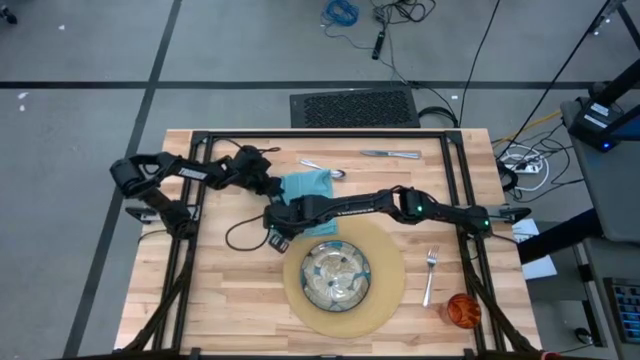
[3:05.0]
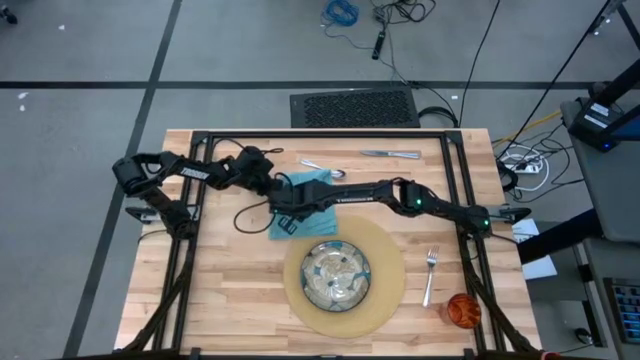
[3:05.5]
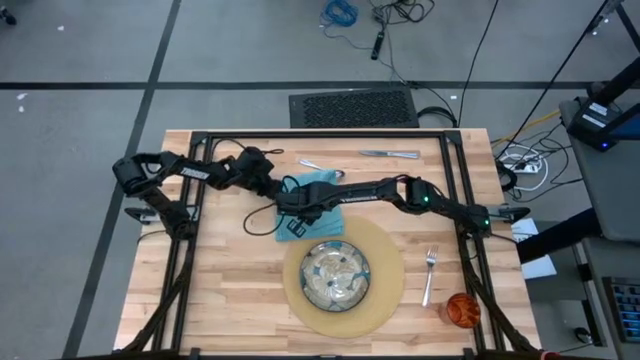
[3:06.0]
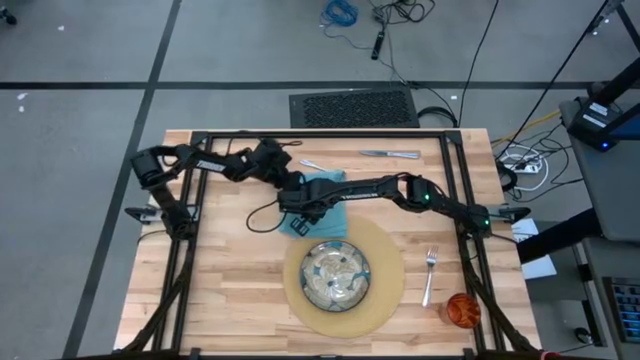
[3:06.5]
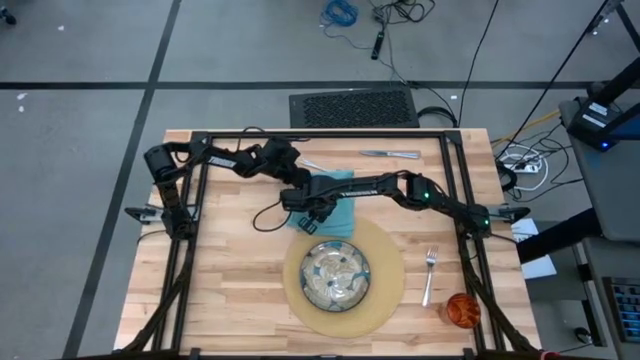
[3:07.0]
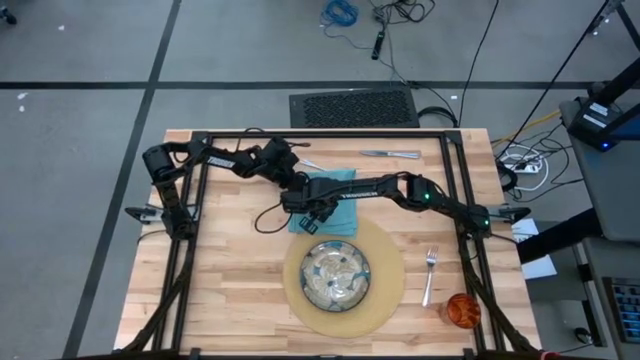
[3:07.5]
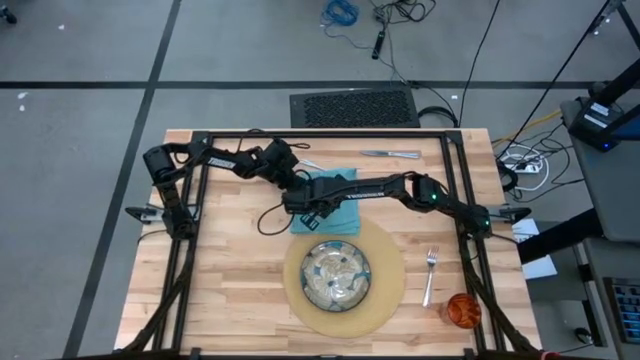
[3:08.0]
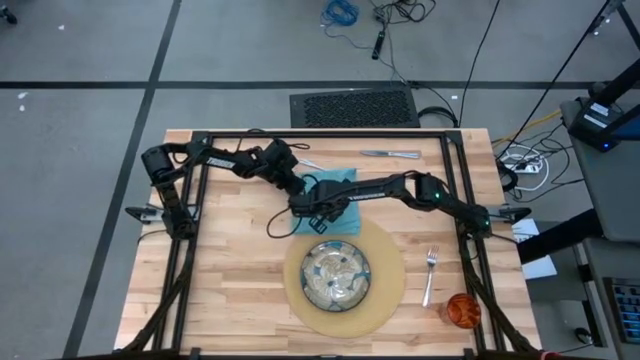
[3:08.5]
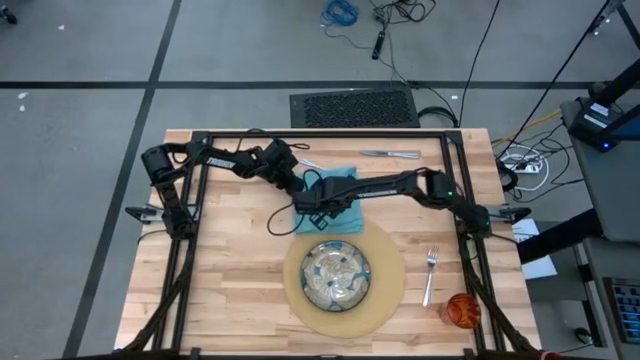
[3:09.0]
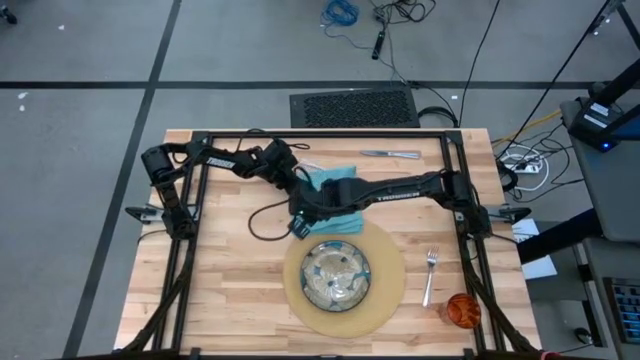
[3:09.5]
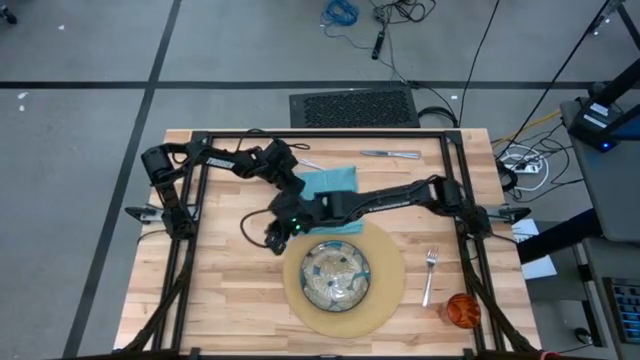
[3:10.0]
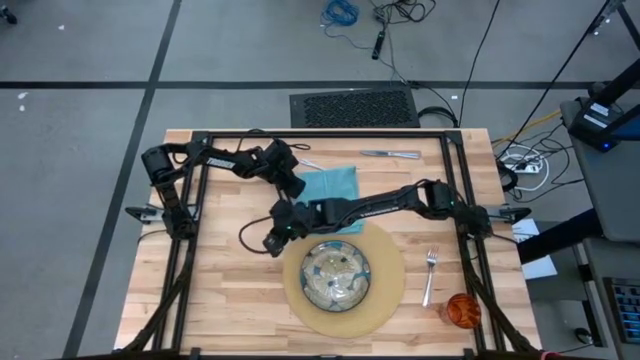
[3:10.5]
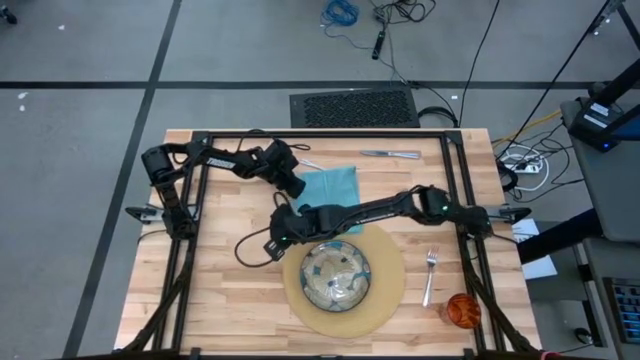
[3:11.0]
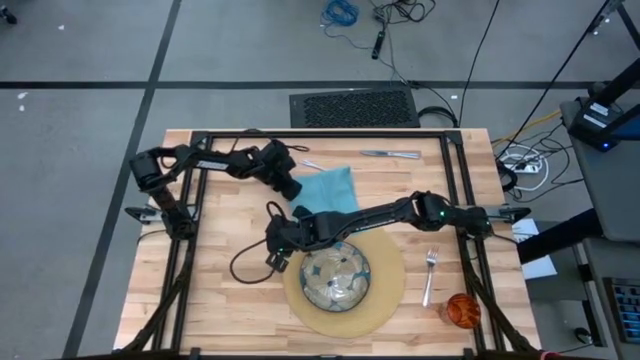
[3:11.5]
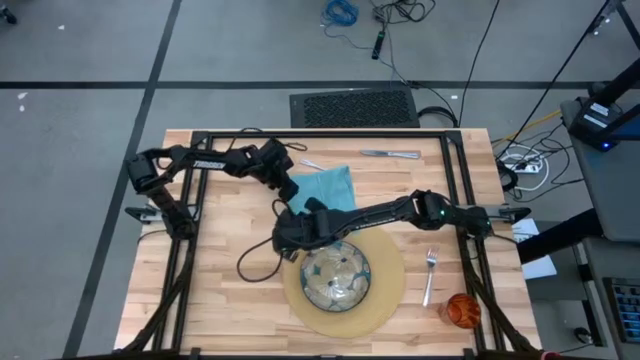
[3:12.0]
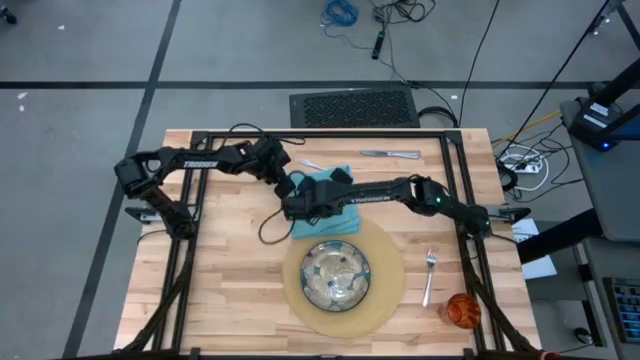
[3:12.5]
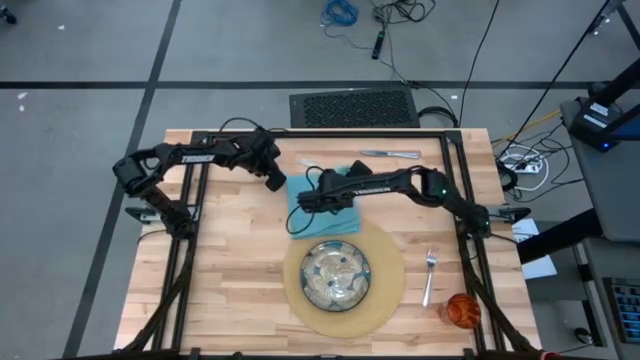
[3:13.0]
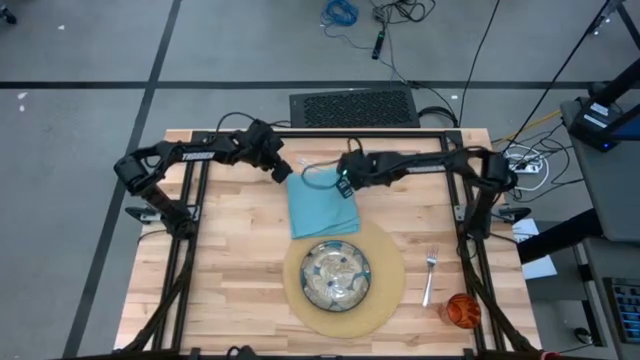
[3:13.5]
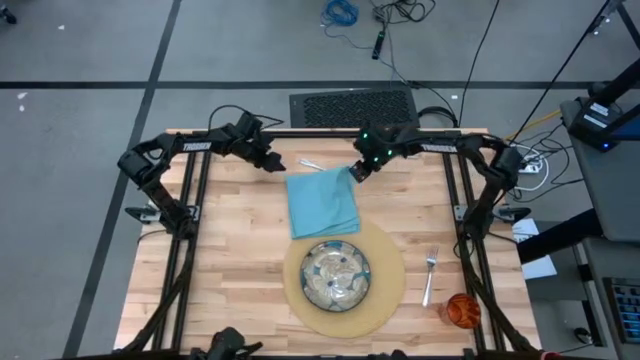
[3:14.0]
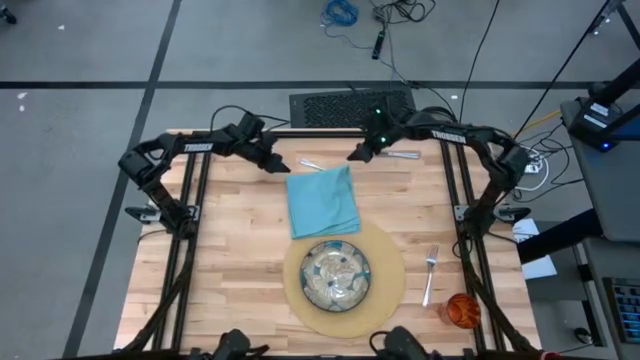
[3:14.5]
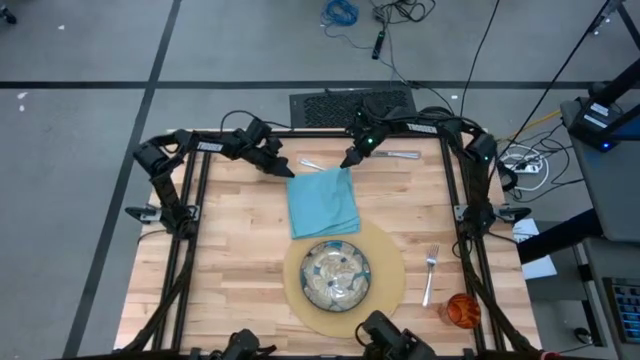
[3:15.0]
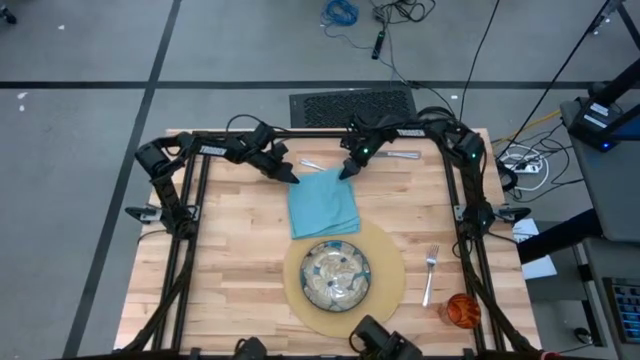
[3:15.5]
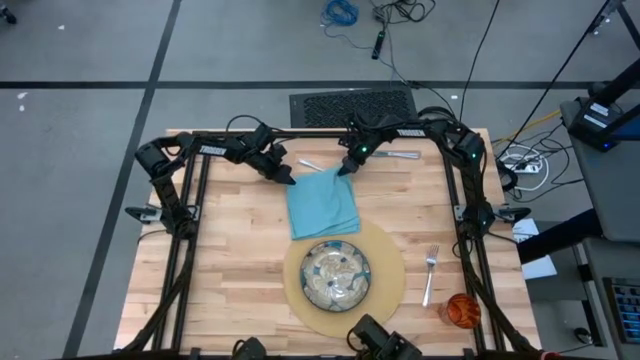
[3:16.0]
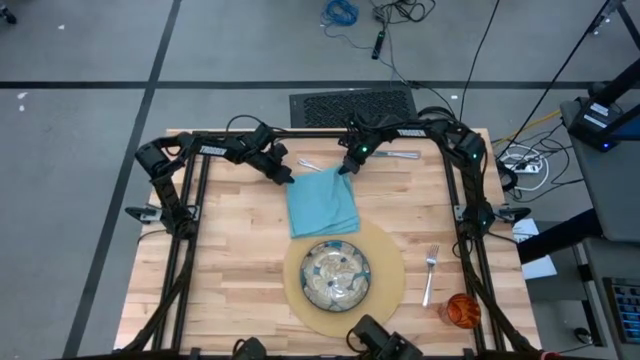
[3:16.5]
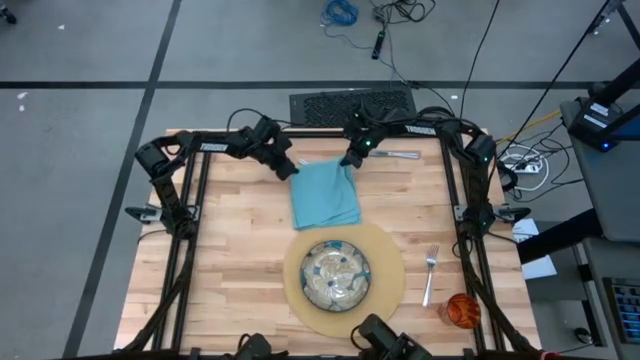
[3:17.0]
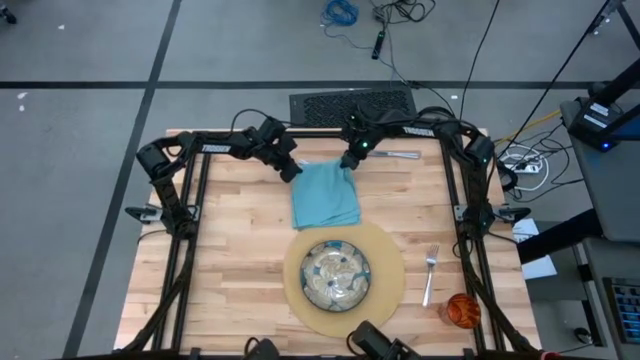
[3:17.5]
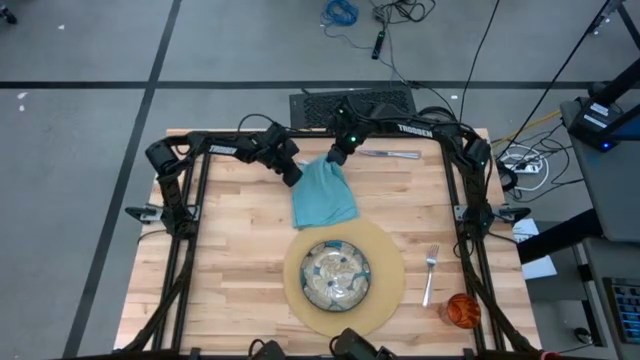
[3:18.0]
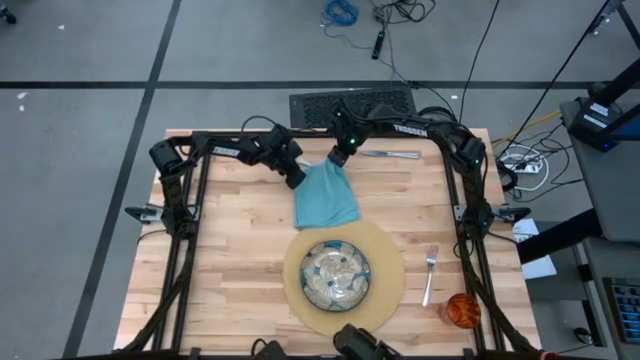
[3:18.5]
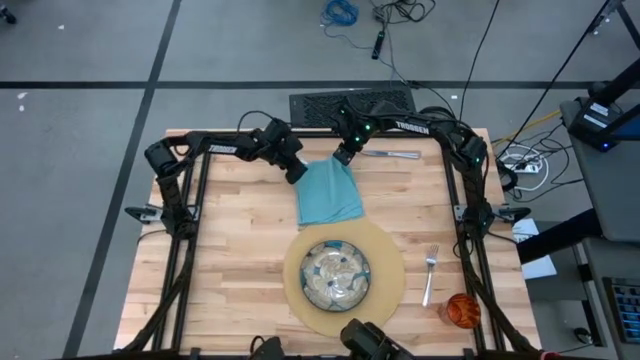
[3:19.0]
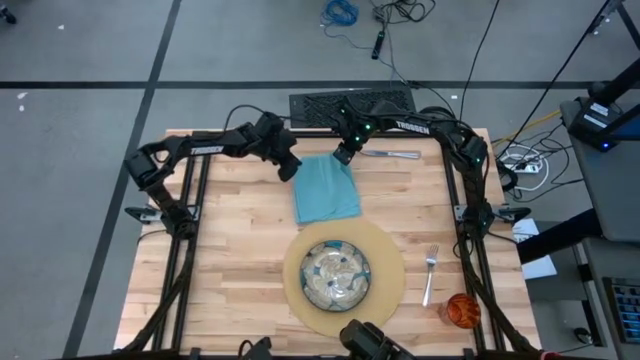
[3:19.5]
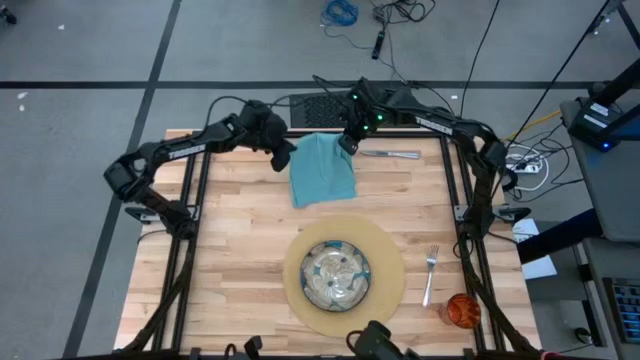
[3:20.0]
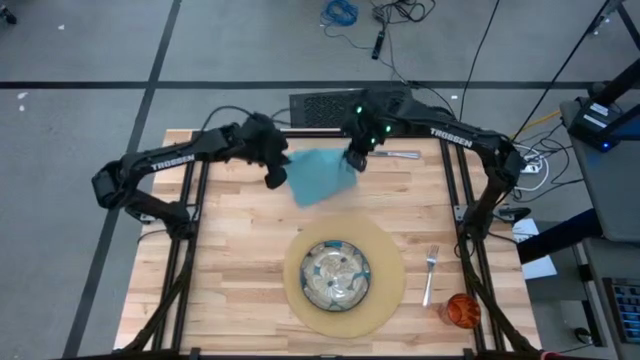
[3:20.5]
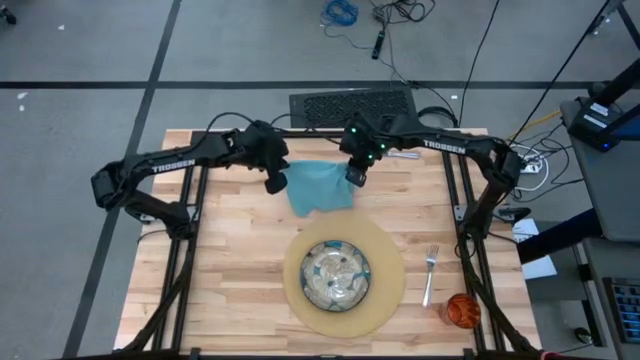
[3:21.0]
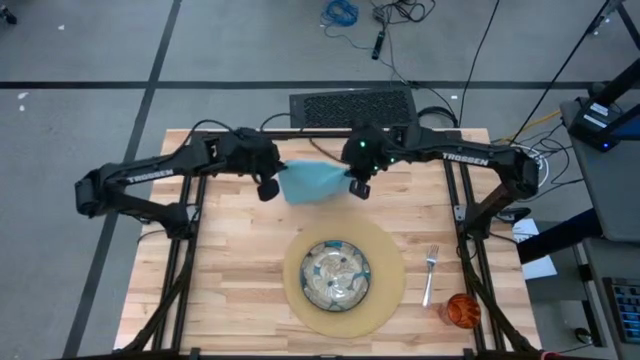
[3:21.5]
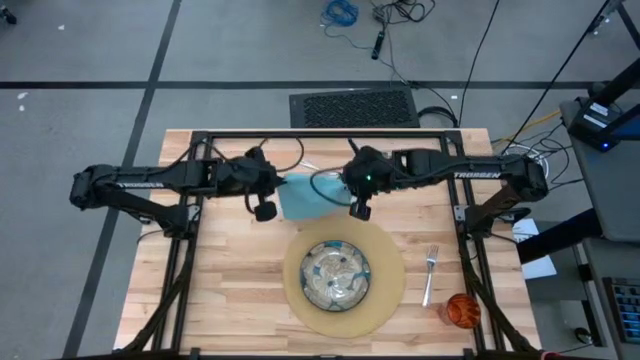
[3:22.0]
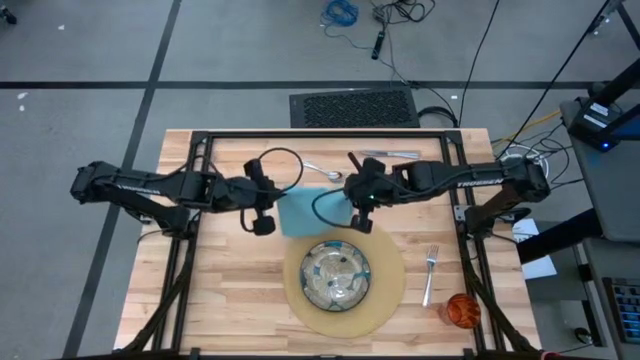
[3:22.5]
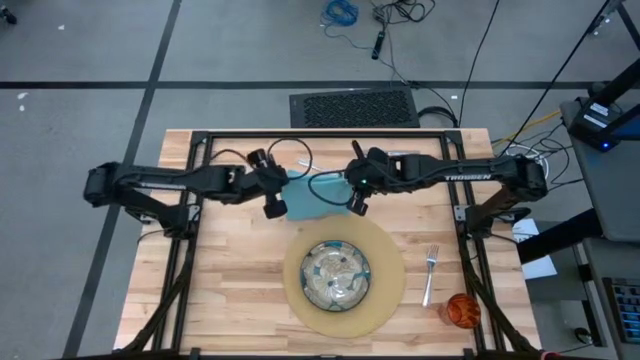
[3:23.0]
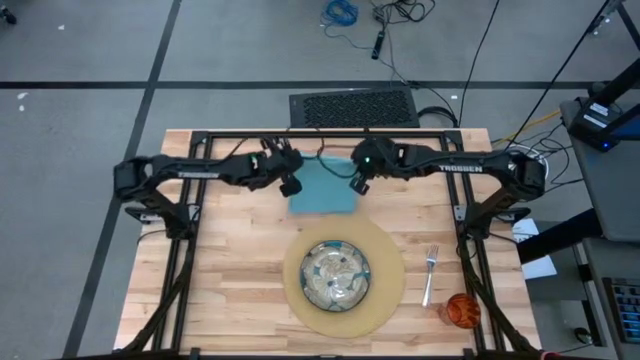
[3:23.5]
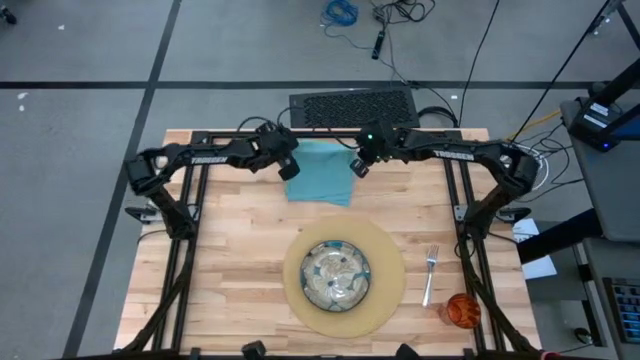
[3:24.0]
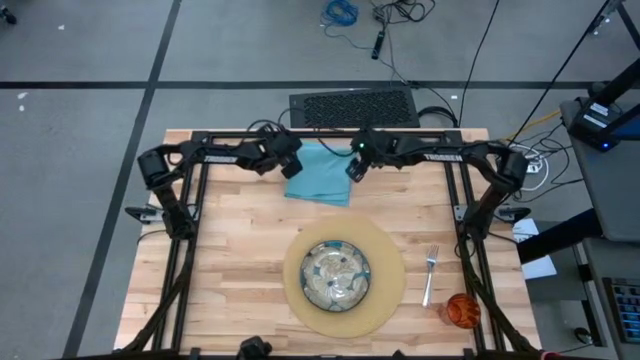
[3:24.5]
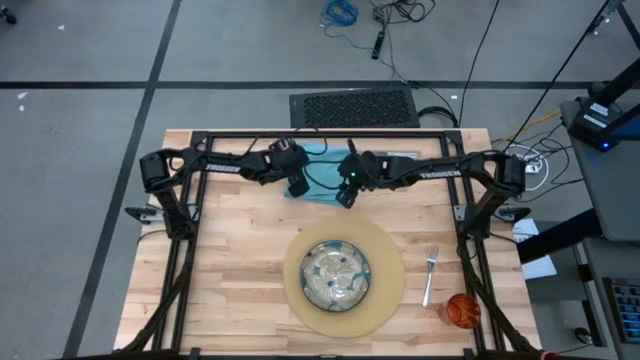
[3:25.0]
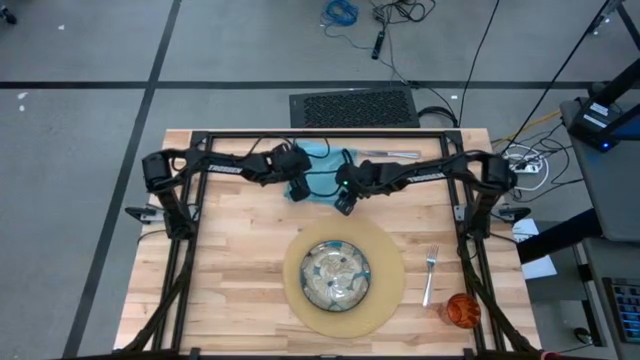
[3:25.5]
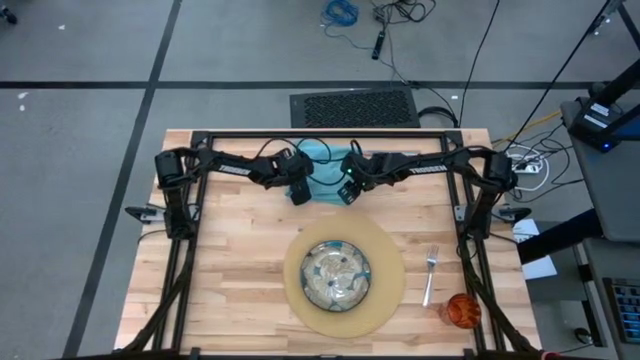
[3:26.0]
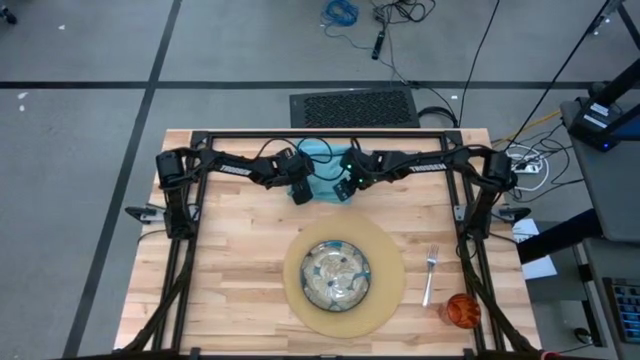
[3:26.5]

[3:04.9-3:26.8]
Task: Set table place
Fold the blue napkin
